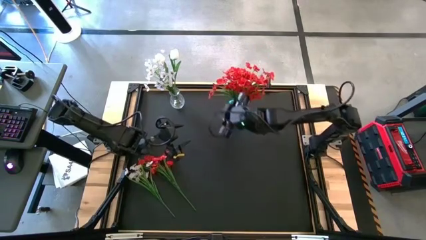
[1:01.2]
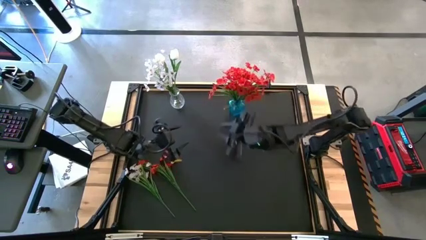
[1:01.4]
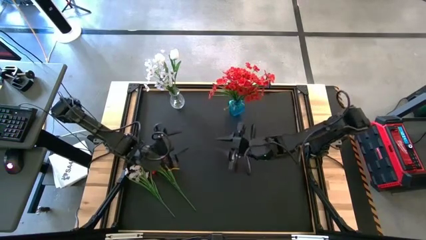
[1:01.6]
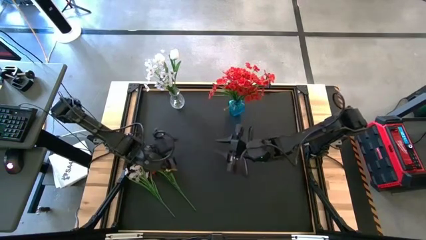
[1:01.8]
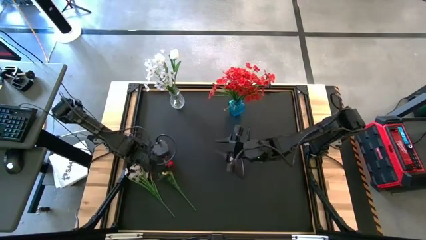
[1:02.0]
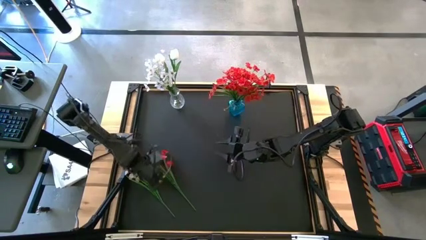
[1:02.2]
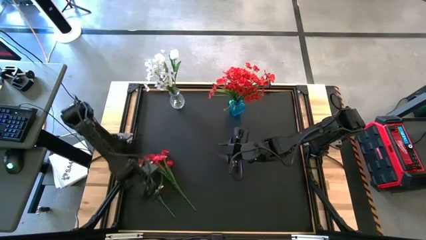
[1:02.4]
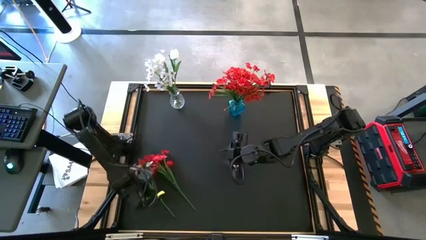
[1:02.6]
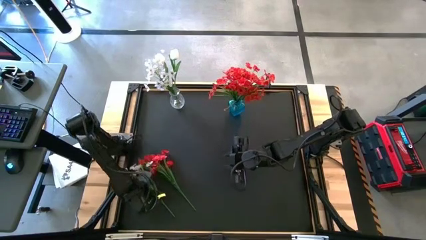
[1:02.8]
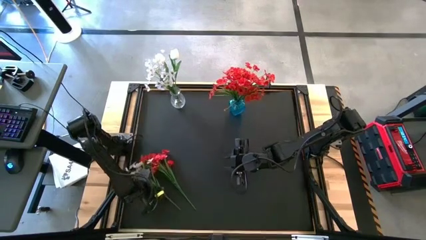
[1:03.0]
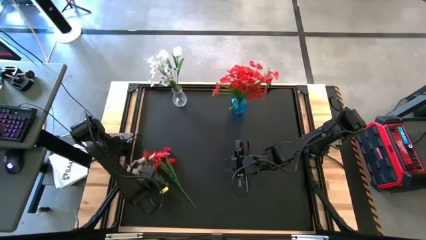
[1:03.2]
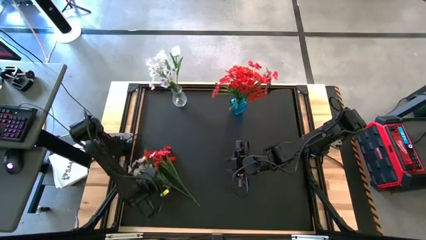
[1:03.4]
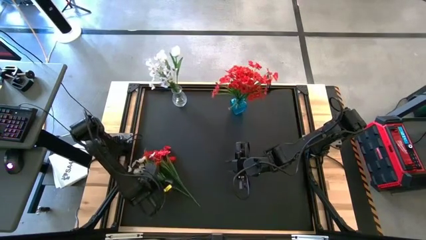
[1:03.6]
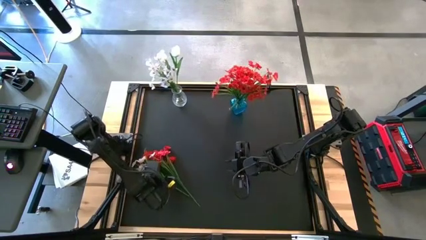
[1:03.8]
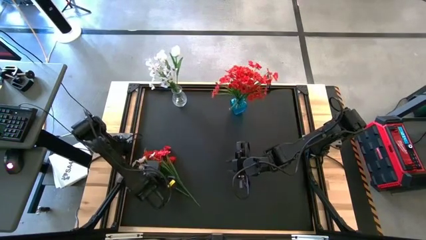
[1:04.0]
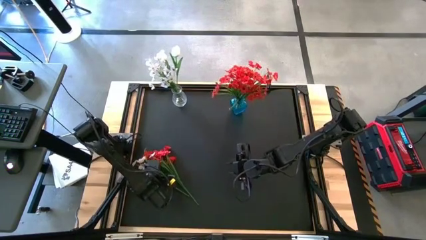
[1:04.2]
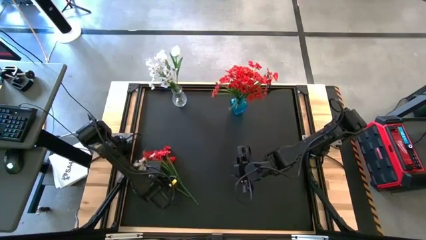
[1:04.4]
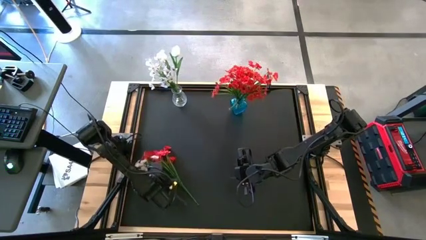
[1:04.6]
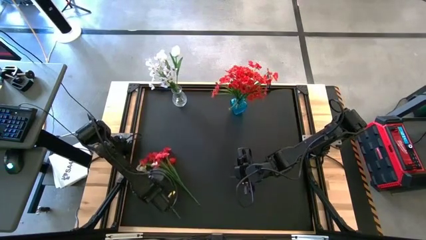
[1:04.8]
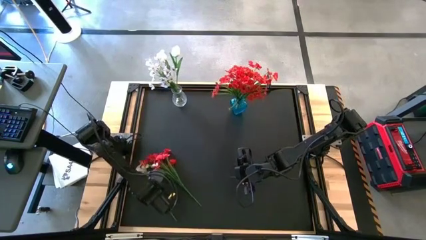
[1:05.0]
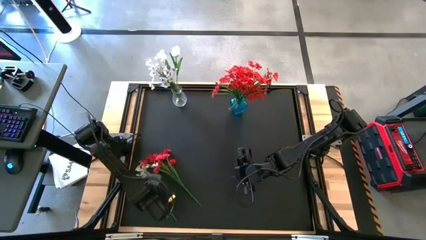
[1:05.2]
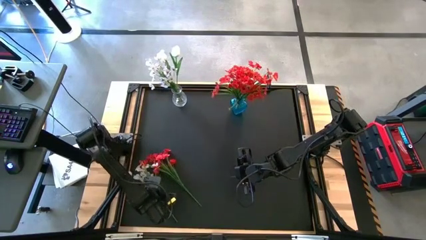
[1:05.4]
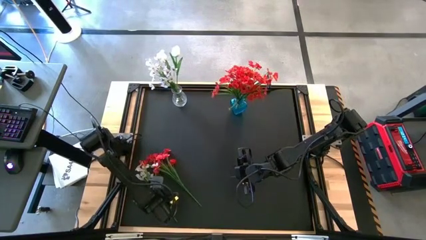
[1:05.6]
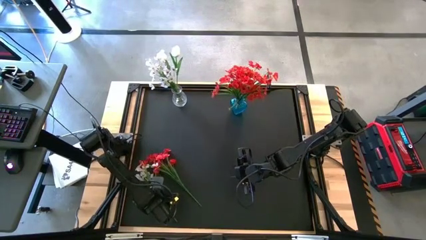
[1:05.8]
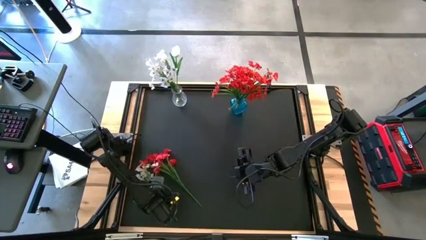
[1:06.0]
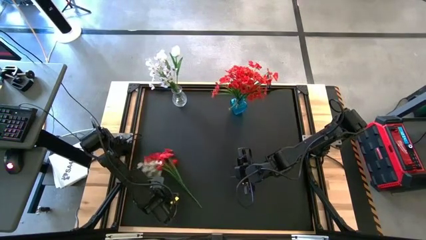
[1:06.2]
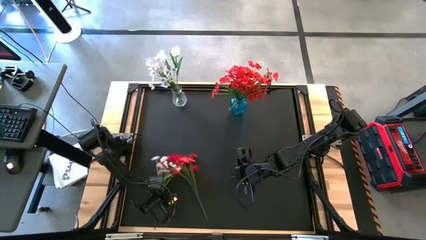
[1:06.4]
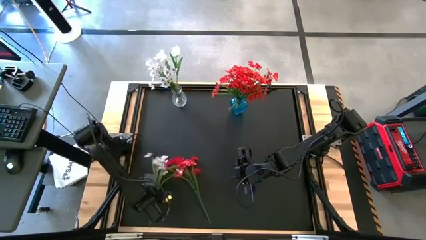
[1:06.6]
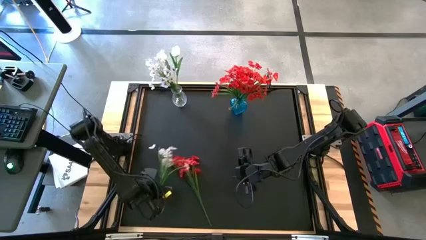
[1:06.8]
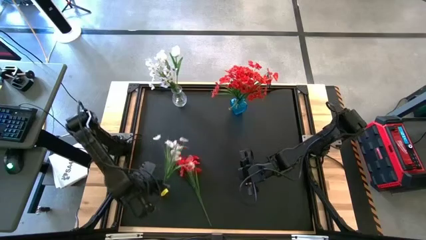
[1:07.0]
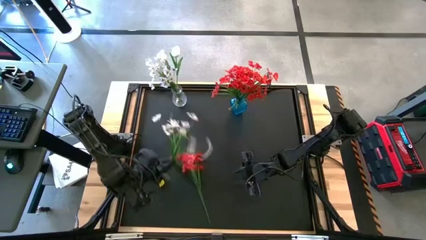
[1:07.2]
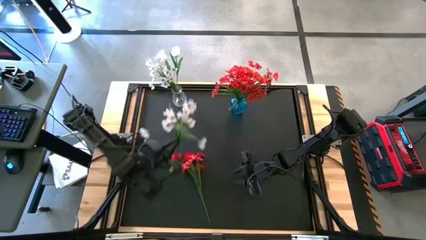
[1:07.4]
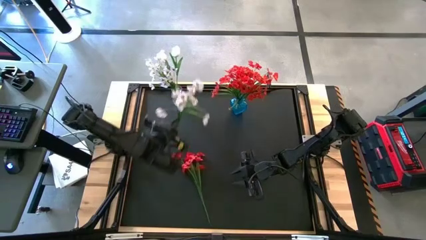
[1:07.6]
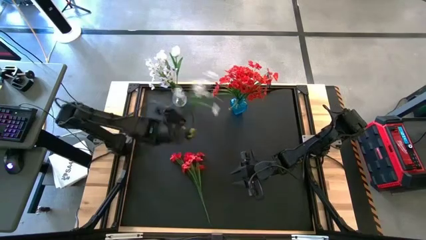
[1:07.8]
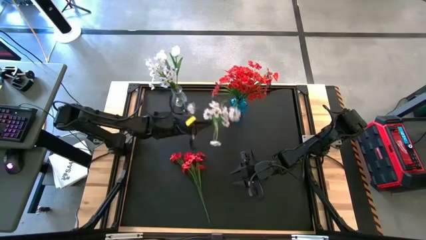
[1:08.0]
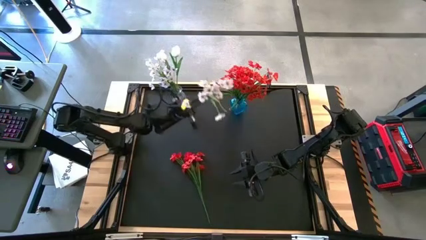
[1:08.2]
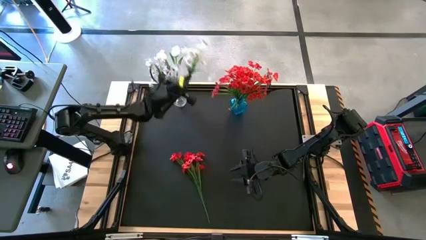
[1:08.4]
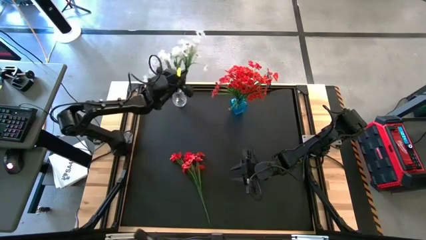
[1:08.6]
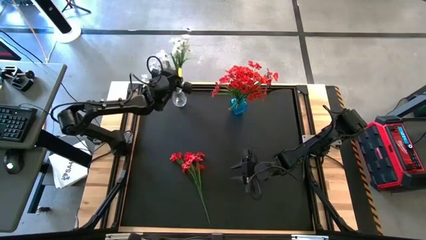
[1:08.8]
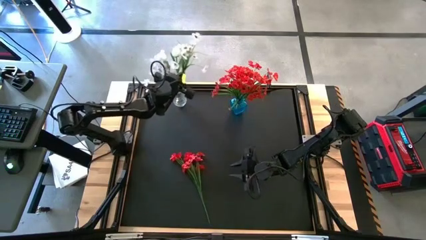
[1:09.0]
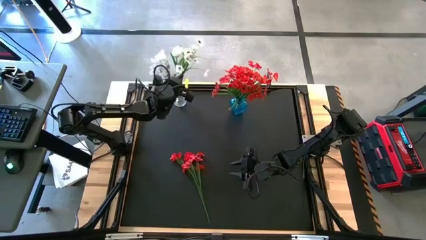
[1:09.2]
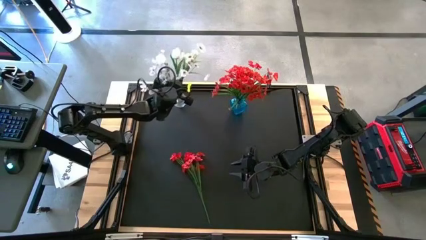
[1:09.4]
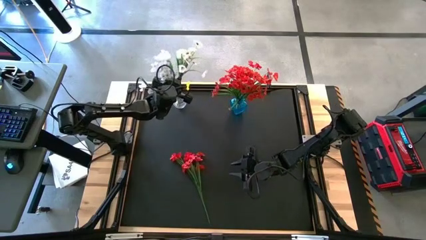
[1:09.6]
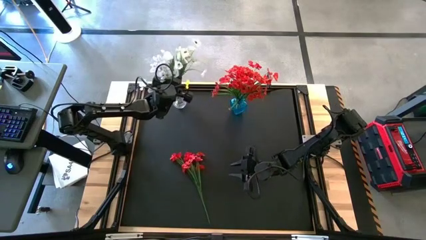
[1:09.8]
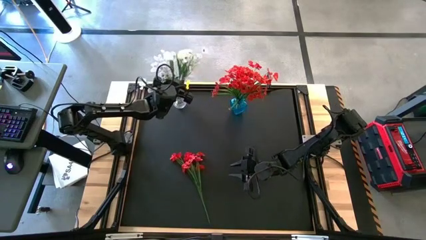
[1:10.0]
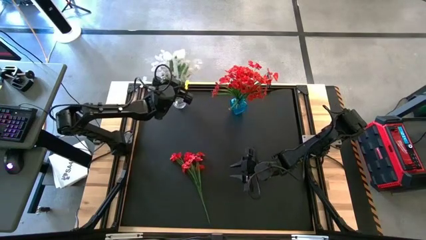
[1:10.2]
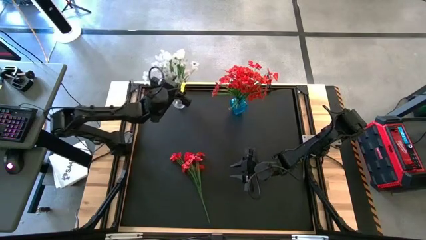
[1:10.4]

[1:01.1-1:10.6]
Task: Sort flowers into vase by color
Put the white flowers into the transparent vase

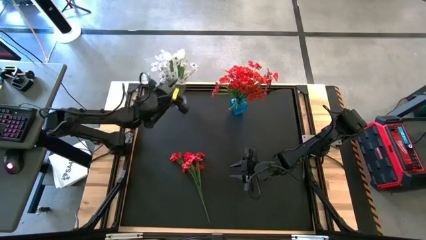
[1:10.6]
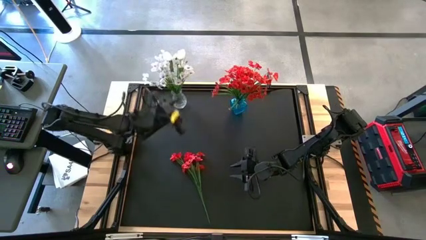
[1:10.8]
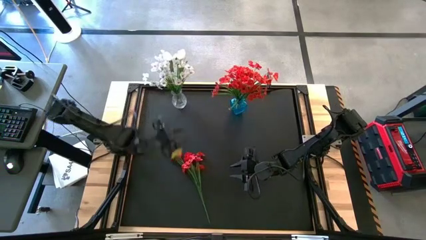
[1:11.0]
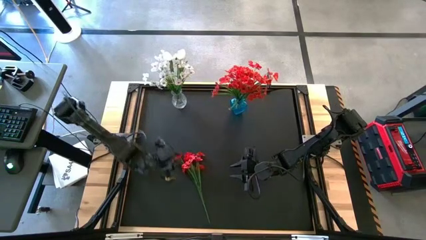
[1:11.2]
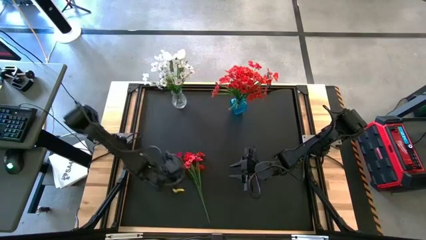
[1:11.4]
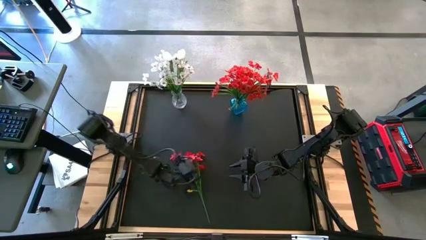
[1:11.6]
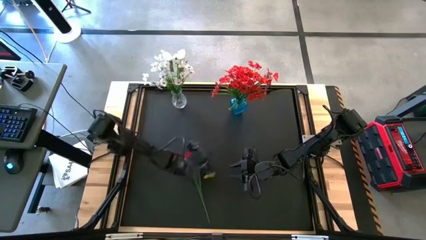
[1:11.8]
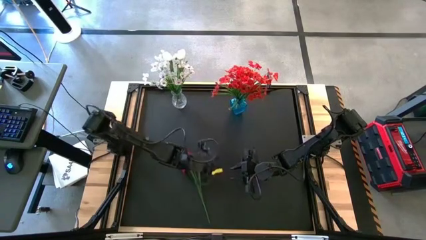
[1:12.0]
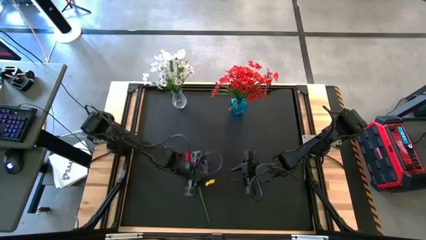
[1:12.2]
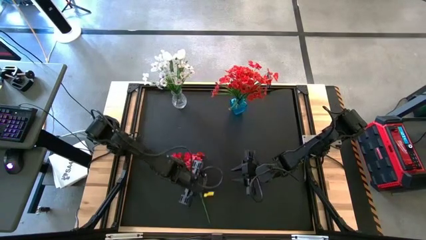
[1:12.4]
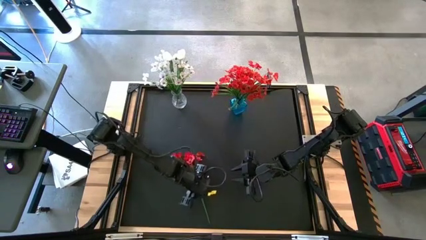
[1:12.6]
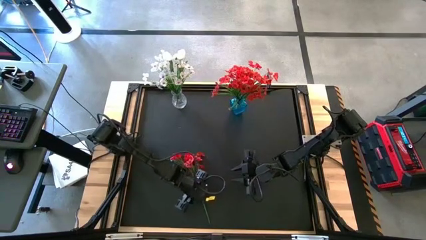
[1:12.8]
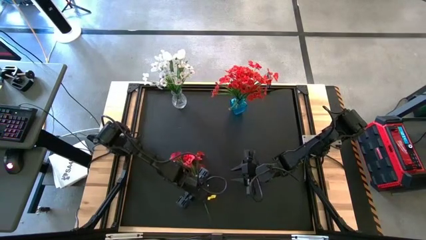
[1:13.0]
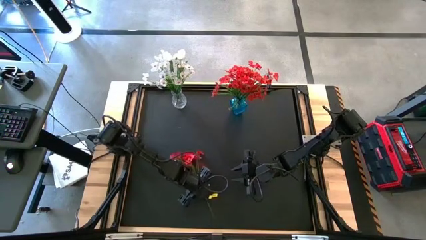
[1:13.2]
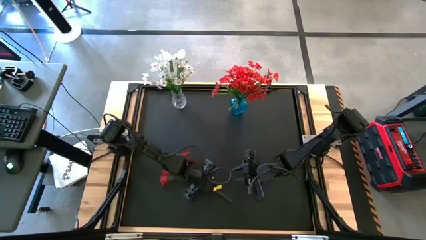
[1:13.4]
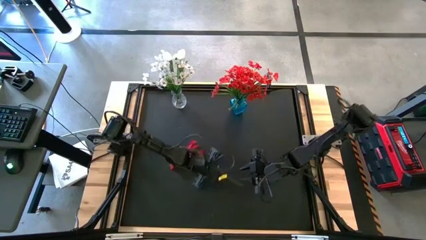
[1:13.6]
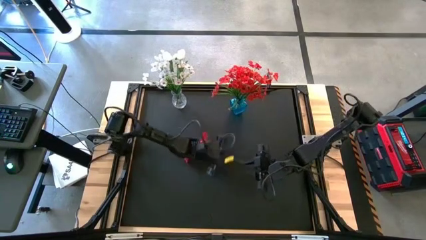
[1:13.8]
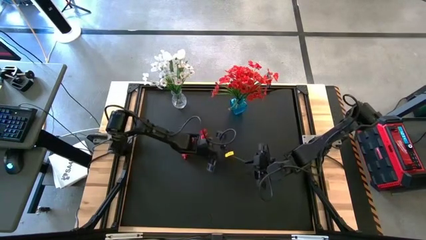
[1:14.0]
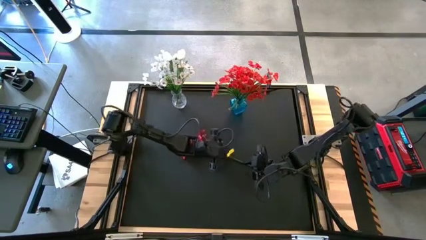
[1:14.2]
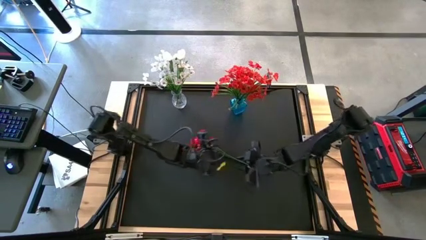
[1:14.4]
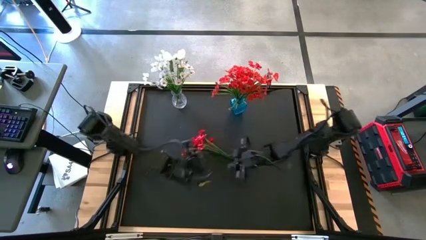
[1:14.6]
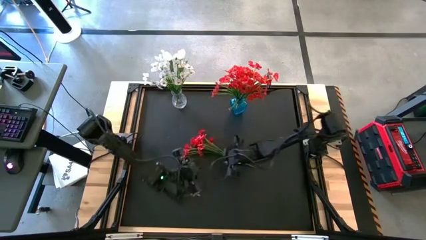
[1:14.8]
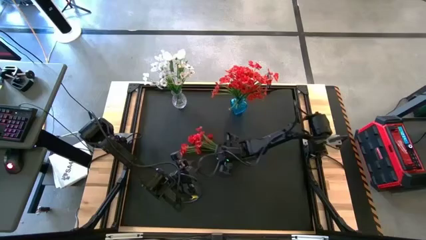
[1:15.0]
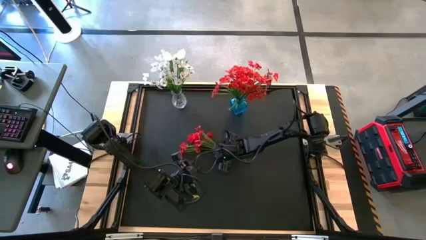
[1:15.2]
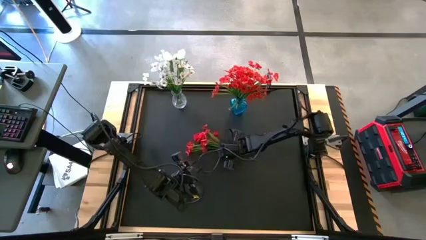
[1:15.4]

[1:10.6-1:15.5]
Put the red flowers into the blue vase
